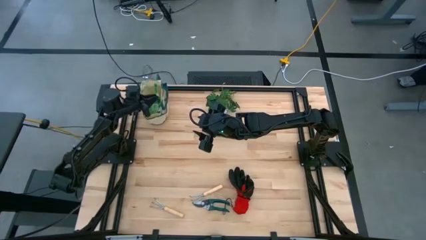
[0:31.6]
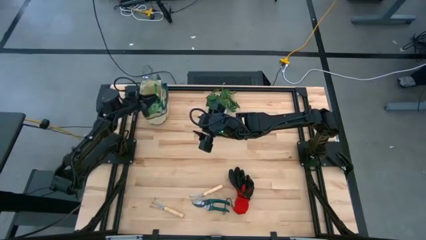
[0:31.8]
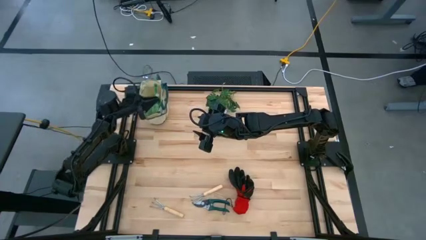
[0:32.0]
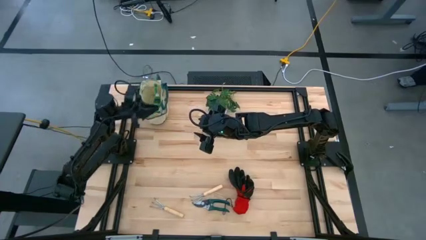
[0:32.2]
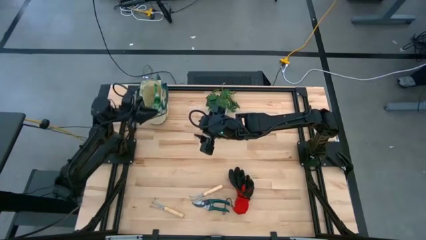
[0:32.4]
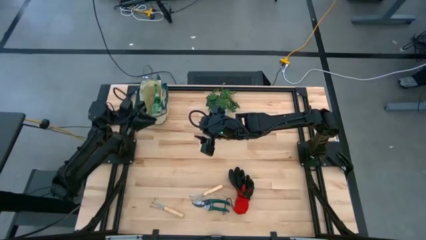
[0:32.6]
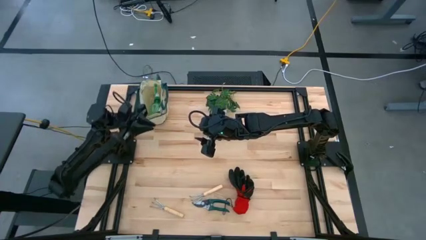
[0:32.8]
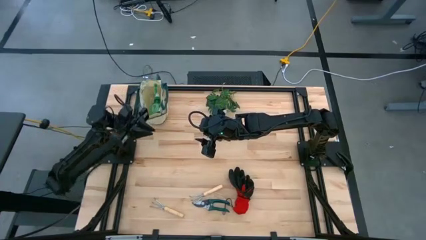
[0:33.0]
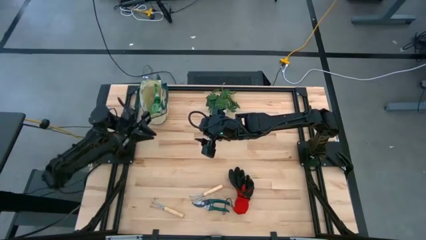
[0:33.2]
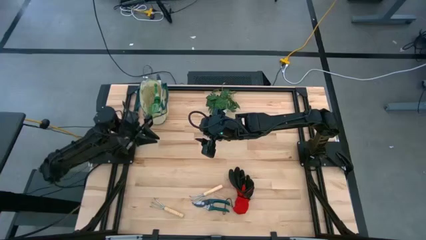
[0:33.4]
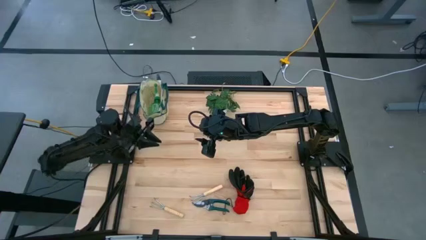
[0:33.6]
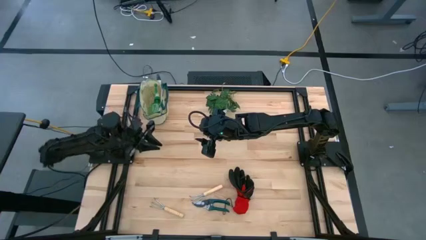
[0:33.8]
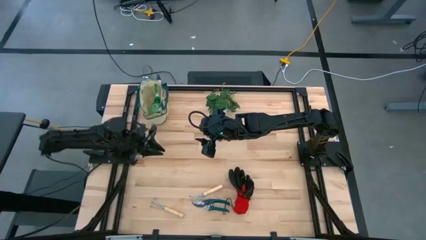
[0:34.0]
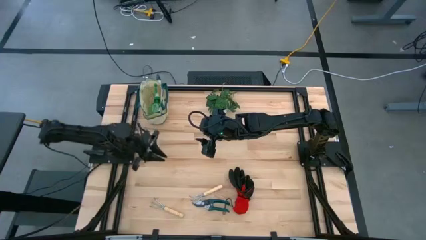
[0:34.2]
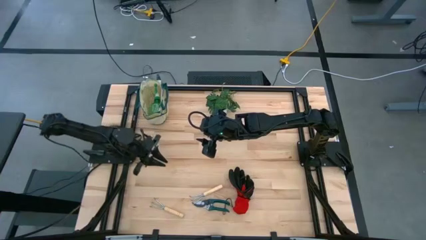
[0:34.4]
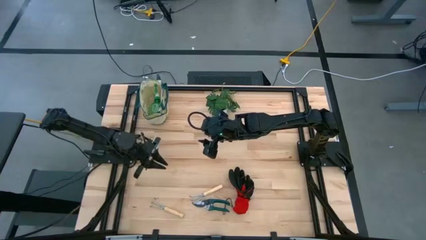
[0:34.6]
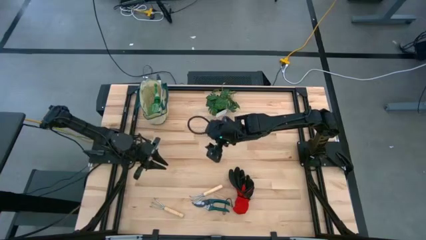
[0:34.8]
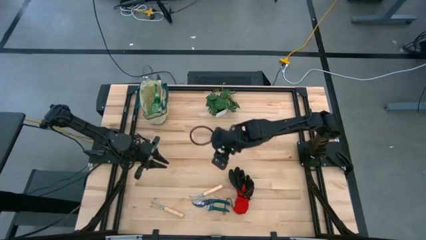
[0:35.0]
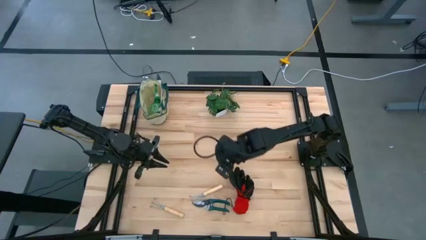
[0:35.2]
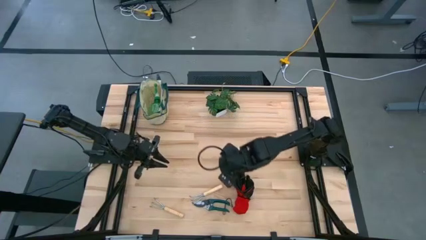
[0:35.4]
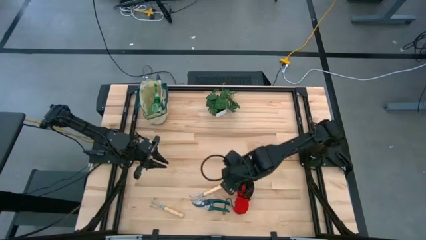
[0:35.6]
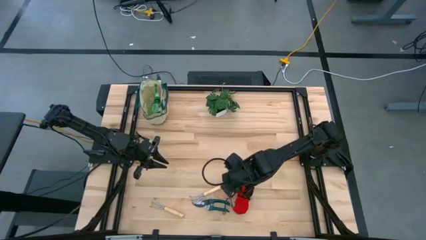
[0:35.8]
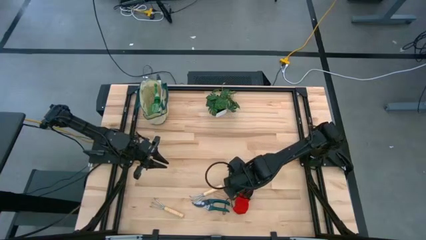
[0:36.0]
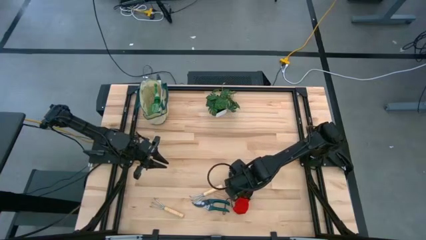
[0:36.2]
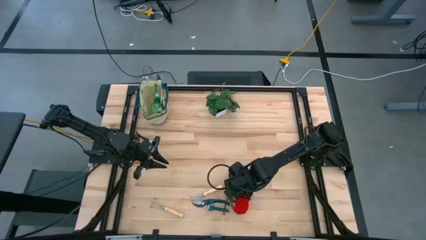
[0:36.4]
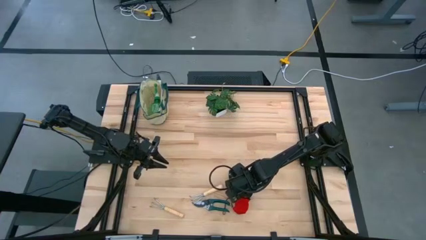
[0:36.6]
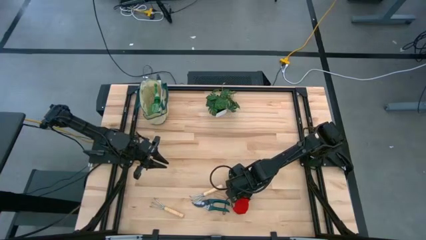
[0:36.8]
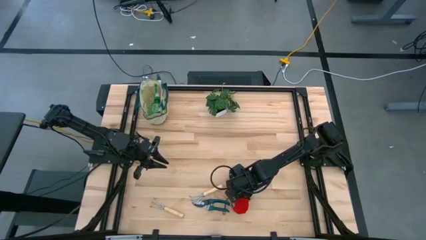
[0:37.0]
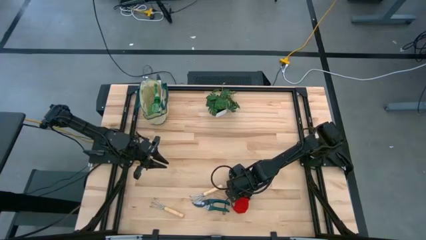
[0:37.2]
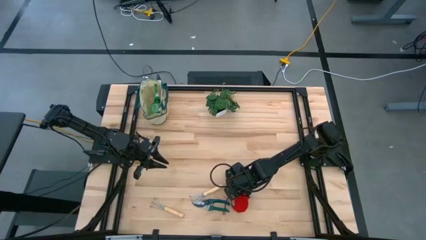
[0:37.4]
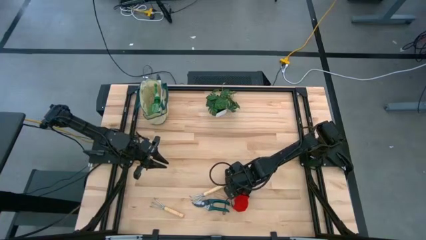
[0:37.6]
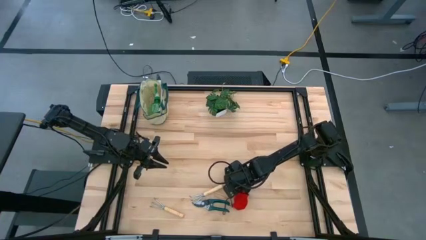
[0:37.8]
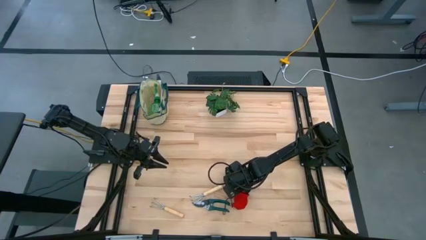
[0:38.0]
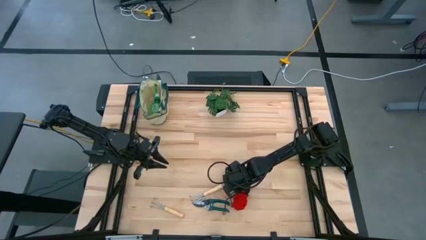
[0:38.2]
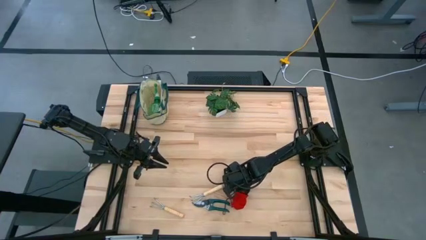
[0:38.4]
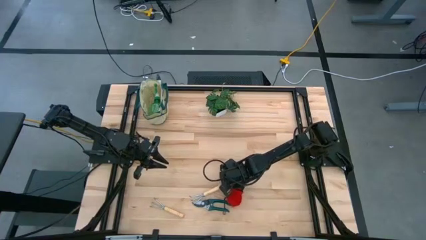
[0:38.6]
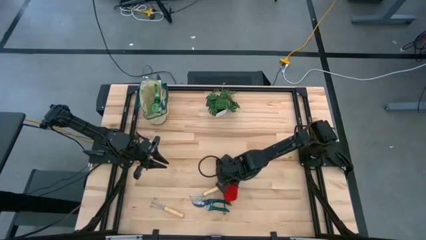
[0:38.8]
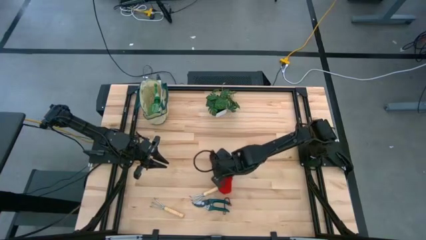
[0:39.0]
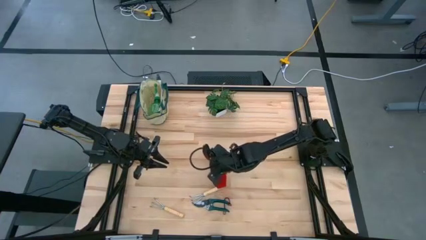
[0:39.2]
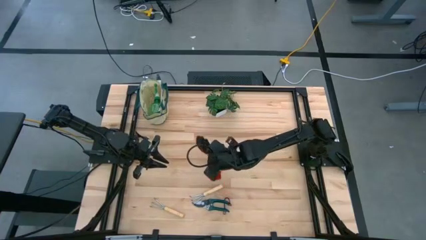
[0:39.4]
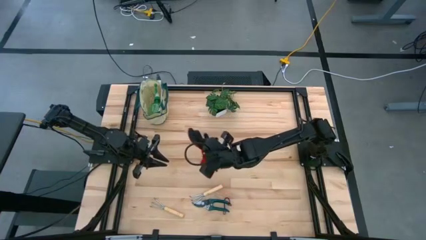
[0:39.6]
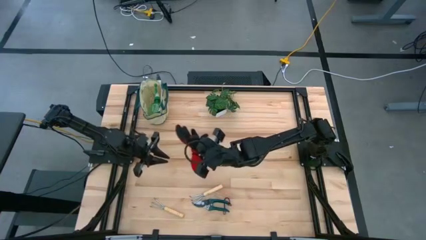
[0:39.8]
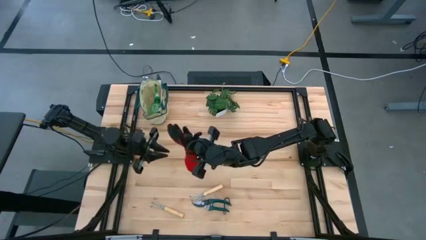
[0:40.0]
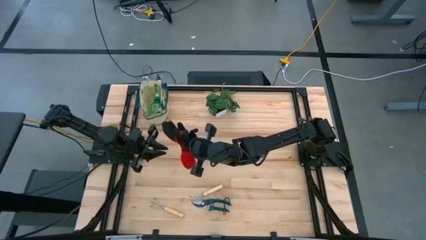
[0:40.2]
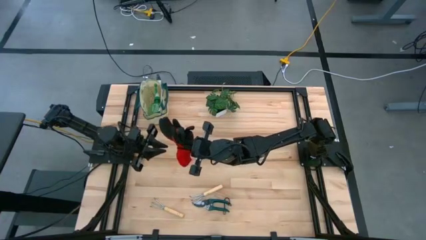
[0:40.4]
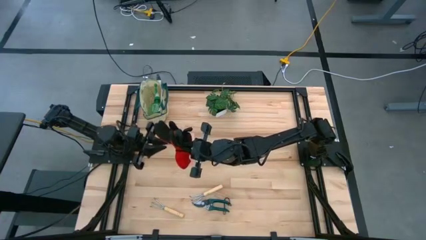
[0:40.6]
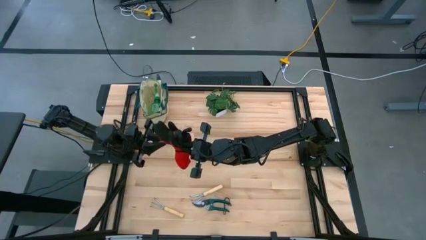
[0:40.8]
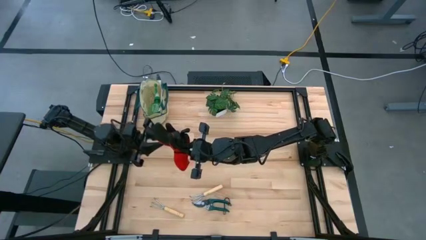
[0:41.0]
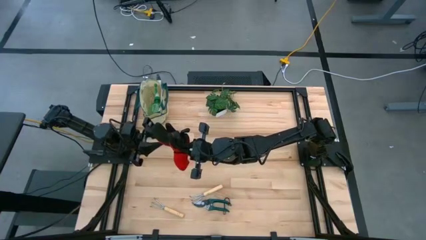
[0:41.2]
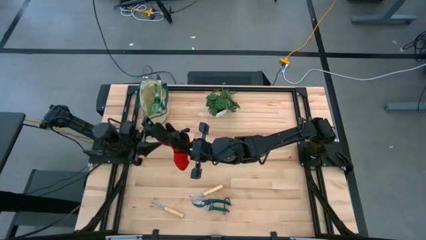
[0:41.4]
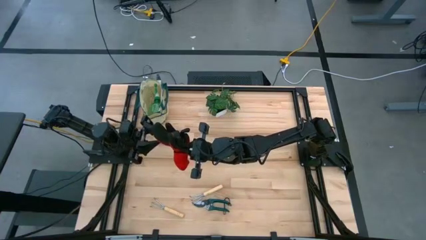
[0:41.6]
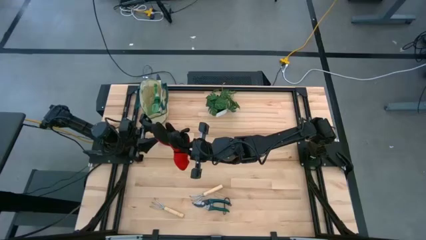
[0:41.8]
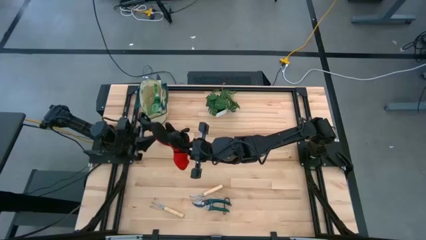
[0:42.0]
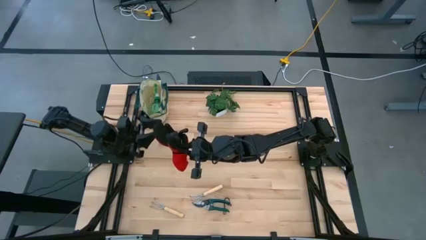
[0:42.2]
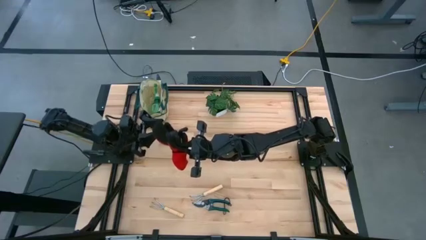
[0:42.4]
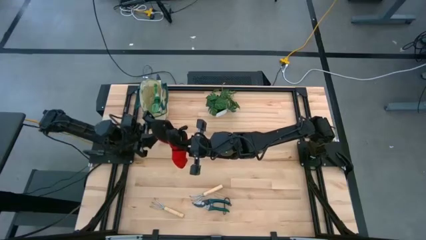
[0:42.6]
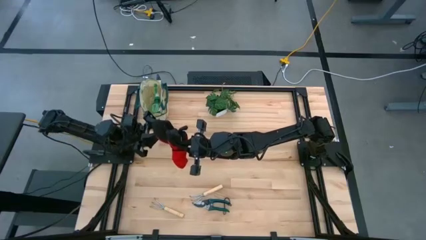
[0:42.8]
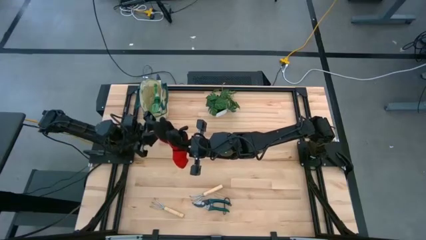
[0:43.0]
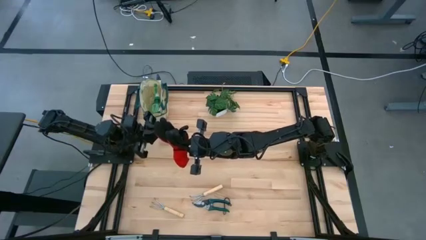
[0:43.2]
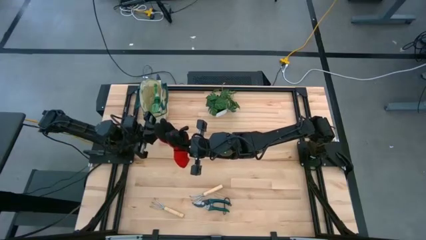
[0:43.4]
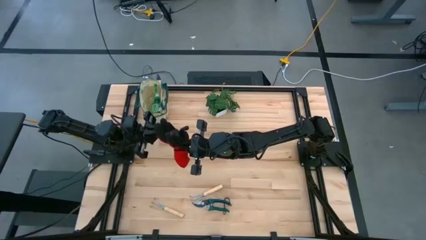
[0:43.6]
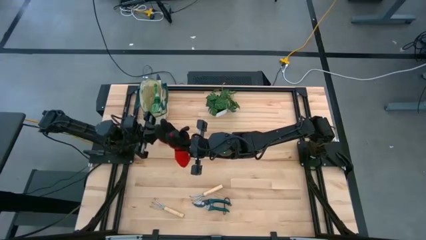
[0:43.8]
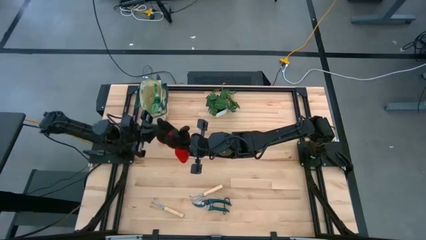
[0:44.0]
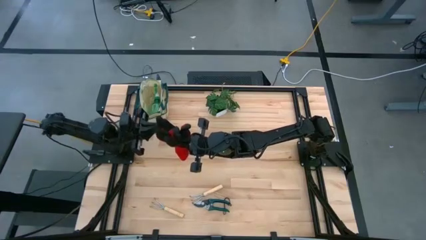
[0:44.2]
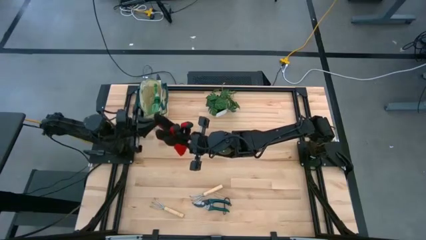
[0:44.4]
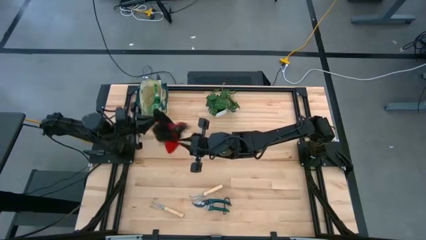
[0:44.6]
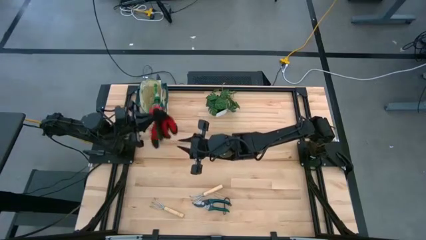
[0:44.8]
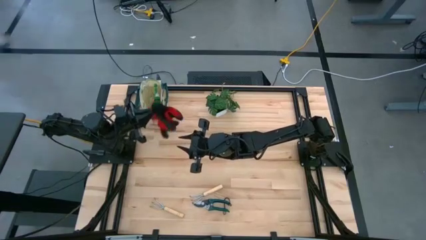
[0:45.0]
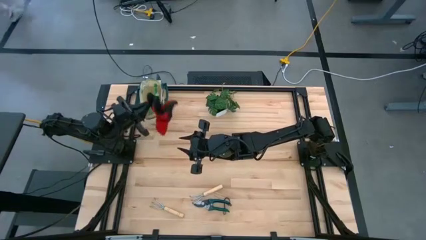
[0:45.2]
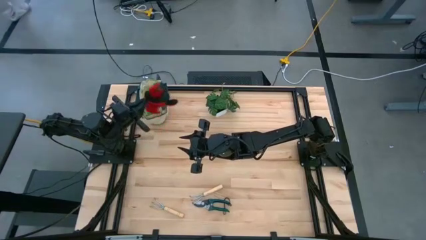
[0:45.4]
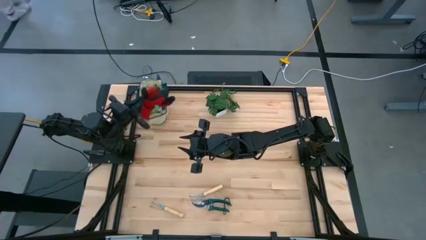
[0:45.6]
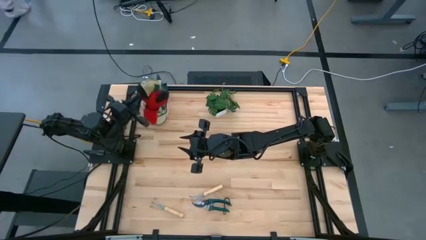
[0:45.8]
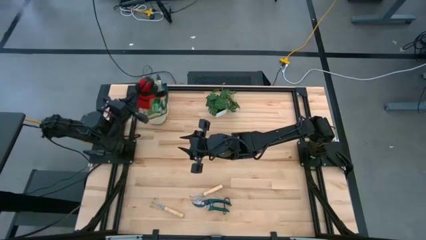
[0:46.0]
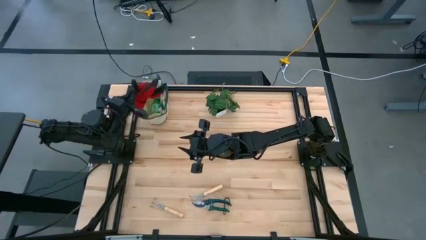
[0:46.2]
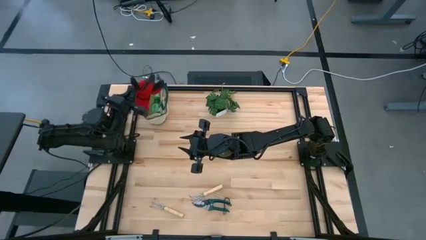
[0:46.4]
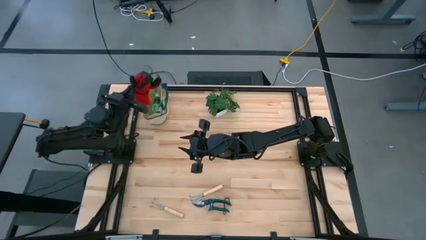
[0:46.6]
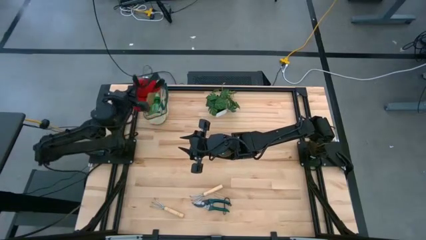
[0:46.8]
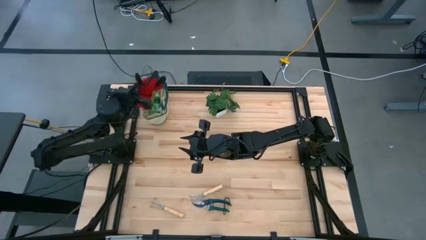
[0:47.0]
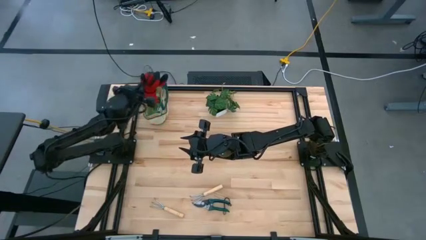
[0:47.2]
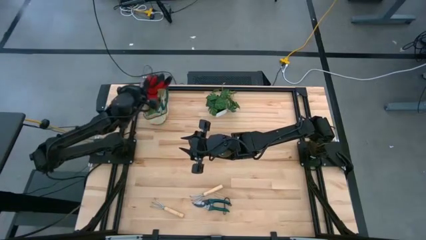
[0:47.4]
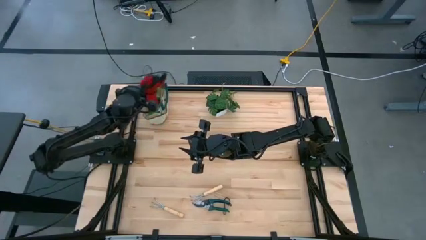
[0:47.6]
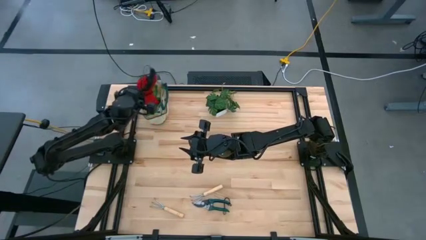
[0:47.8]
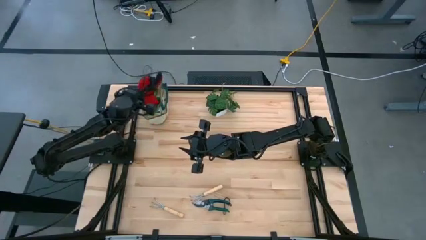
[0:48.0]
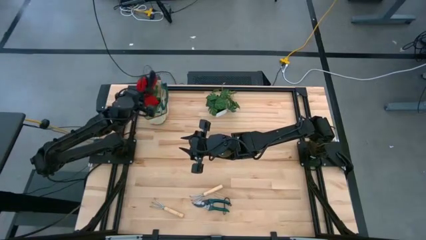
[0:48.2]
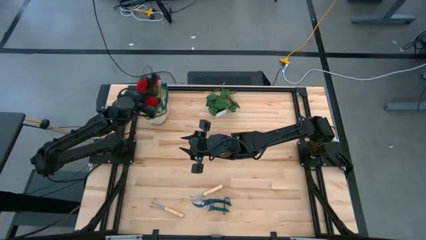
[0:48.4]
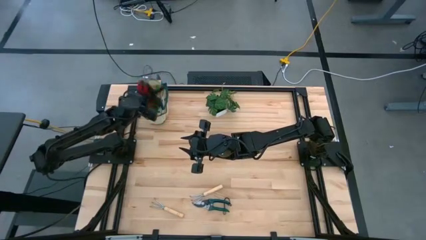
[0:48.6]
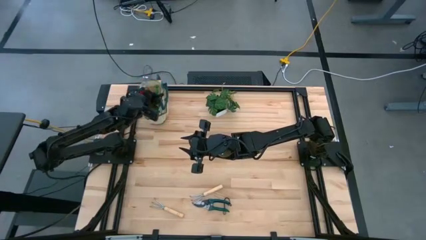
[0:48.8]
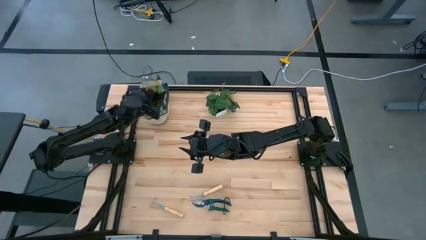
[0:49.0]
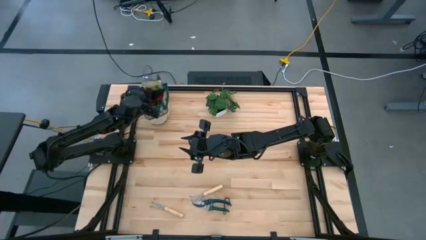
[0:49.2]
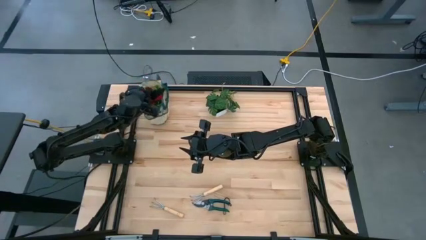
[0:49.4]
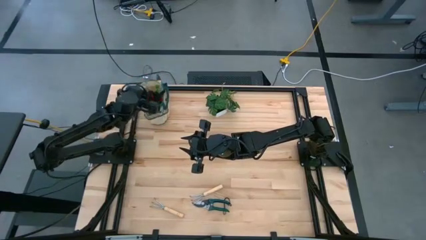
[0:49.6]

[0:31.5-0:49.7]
Task: Pick & Place Garden tools in Gardening bag
Put the red glove into the green gardening bag
